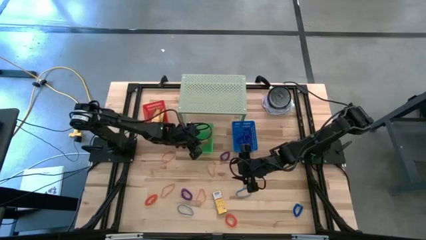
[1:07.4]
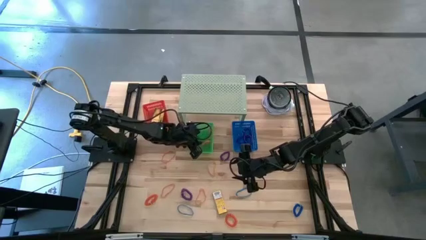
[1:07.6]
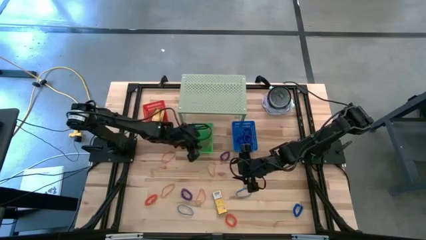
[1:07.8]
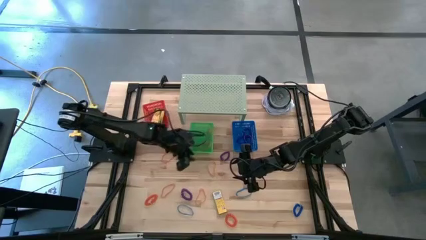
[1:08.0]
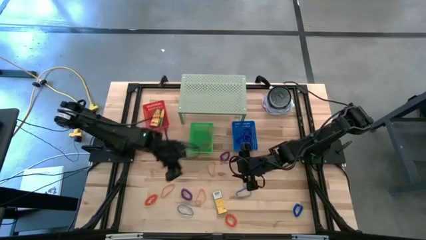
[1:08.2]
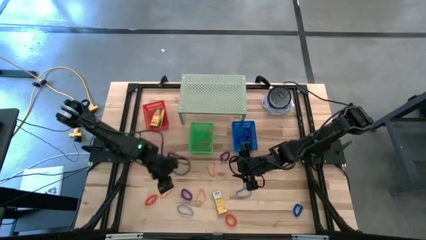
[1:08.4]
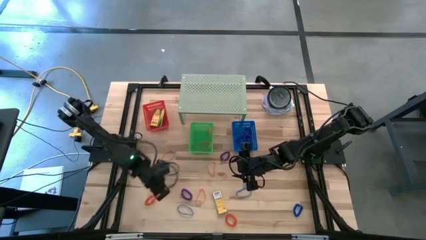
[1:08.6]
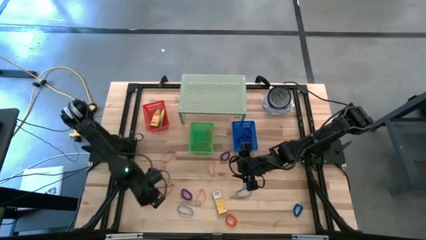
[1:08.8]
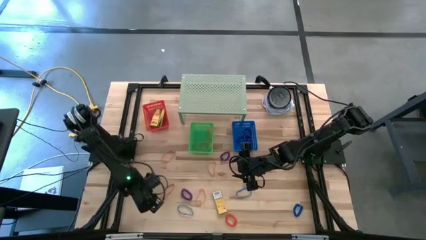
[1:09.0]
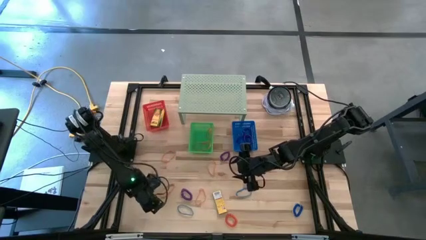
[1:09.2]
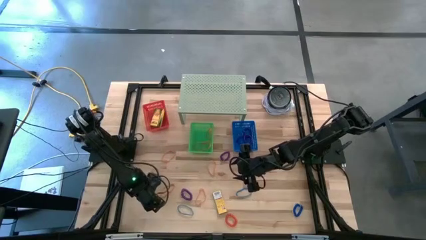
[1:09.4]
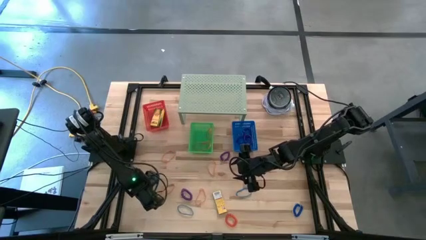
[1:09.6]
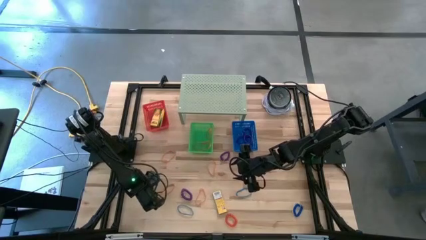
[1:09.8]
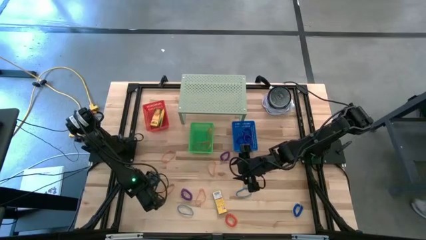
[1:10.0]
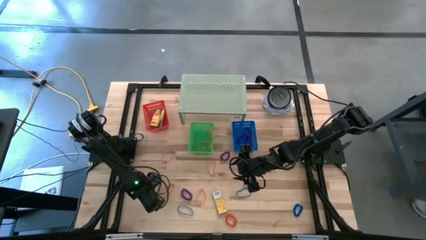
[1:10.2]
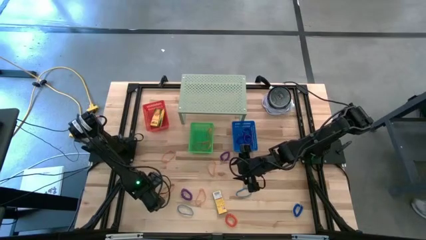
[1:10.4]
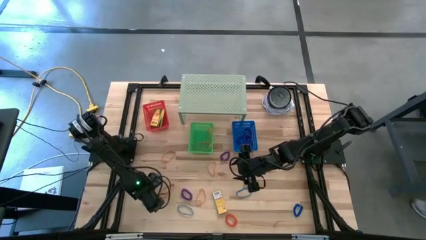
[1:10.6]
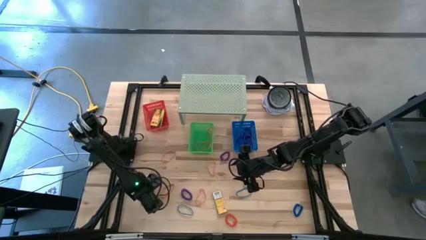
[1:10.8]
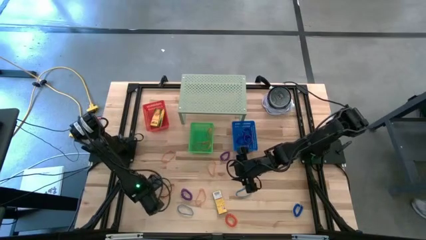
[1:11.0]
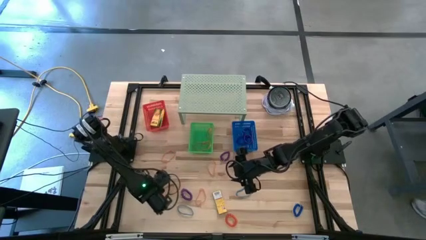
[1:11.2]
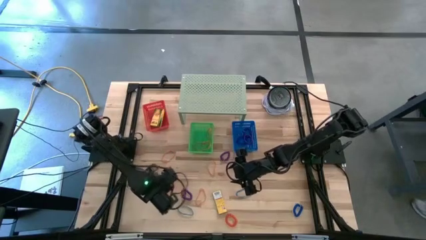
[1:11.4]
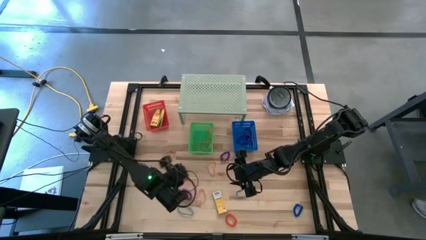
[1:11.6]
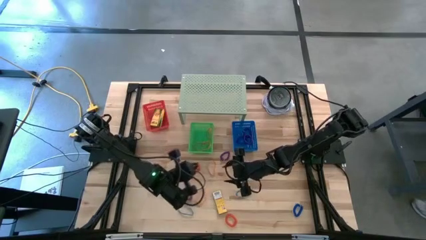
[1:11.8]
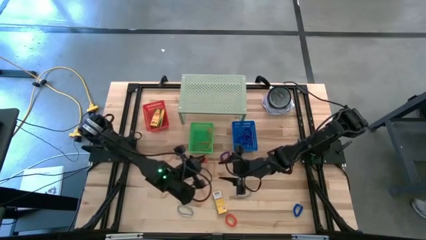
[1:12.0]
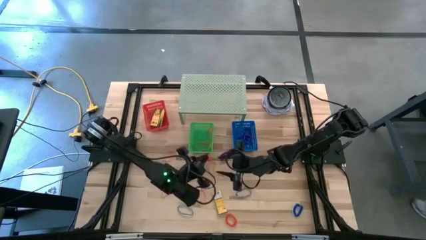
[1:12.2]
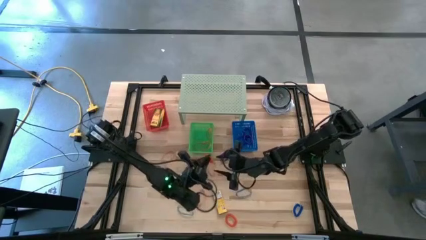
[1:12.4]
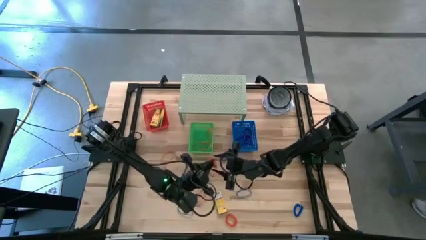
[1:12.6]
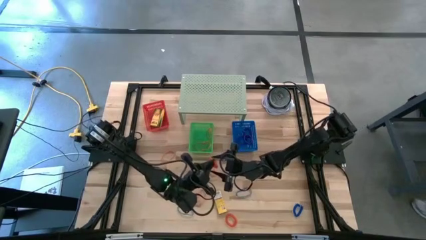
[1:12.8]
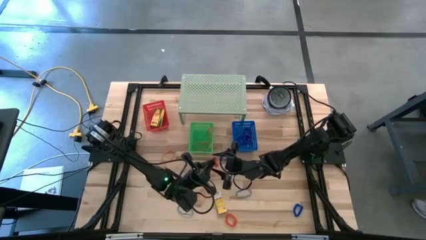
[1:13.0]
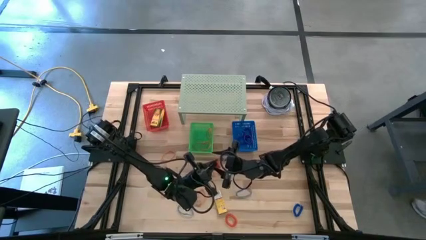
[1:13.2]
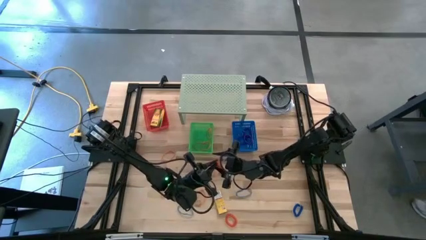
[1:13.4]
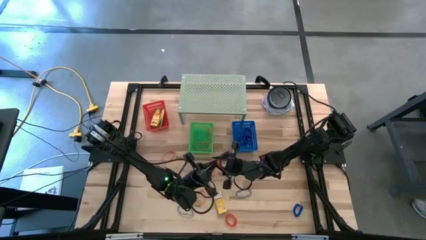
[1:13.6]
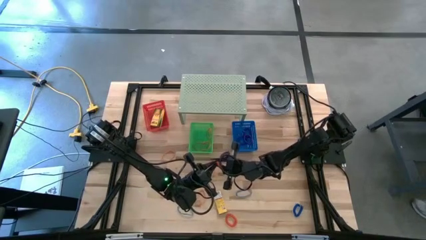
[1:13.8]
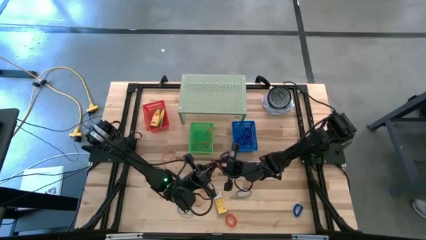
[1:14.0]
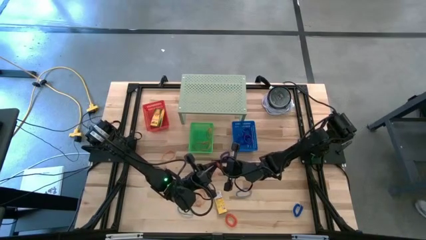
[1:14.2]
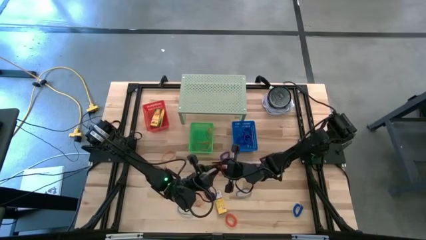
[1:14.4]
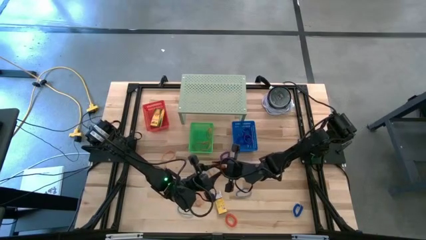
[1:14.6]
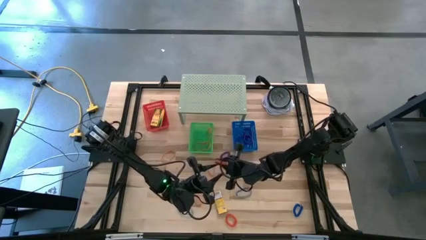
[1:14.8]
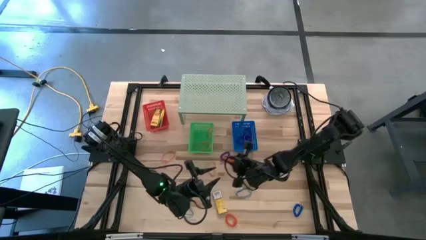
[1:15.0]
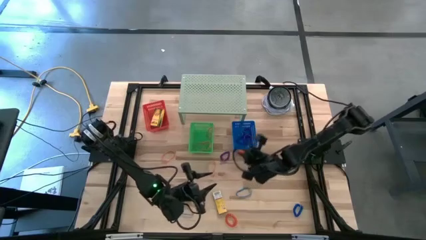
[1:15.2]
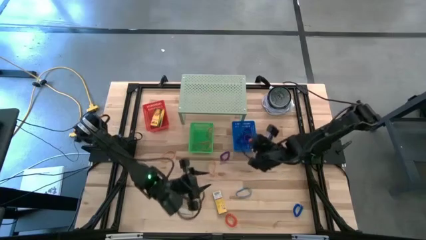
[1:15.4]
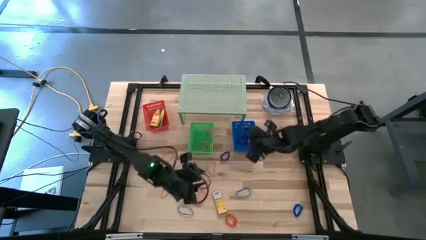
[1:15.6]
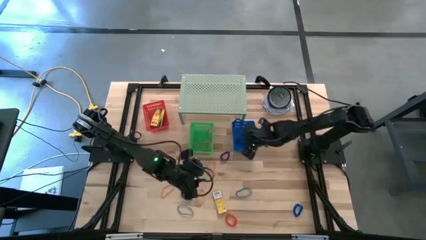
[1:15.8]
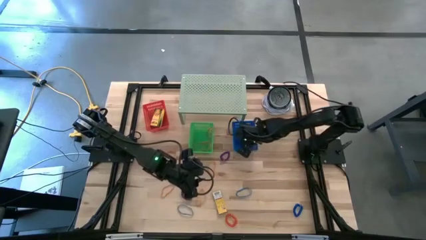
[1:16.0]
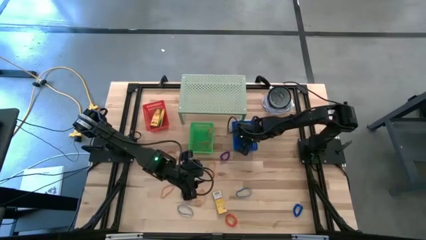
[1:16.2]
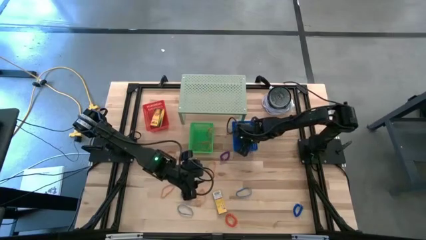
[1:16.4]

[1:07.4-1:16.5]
Task: Pick & Place Office Desk Supplies
Put the orange spring keychain into the blue bin

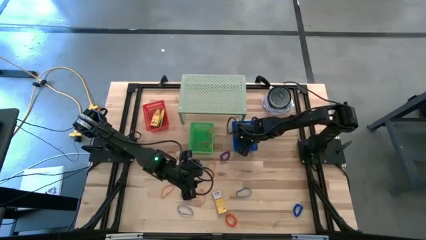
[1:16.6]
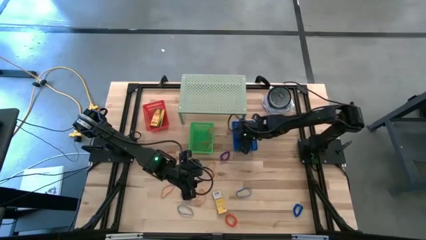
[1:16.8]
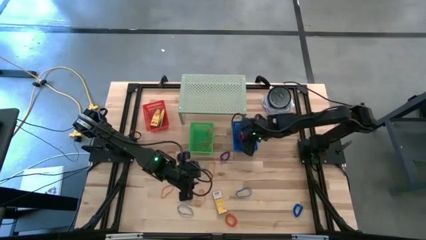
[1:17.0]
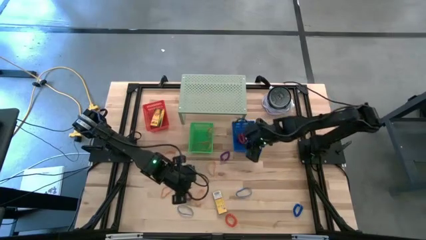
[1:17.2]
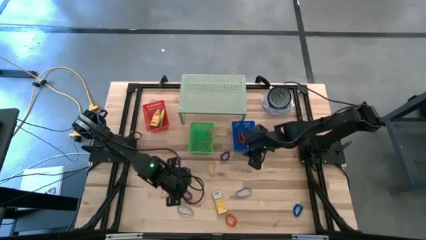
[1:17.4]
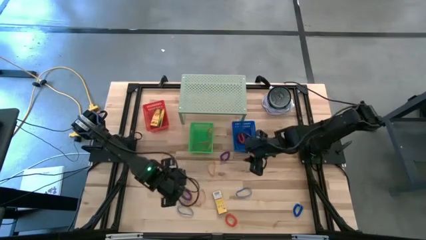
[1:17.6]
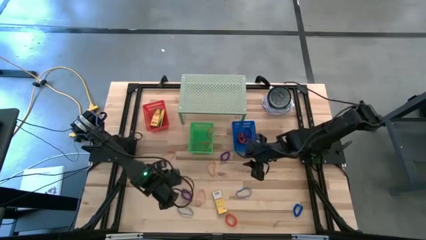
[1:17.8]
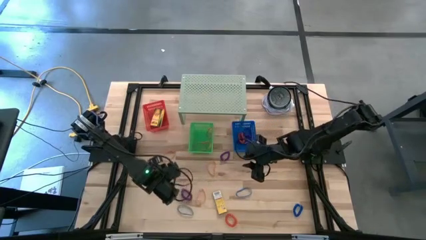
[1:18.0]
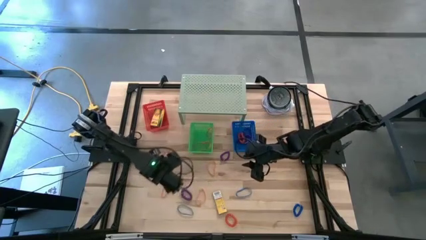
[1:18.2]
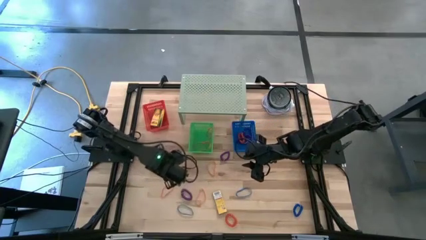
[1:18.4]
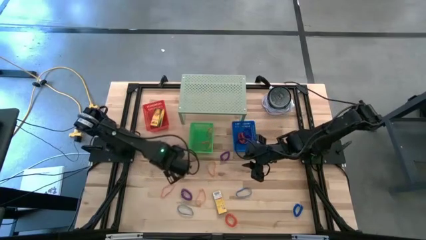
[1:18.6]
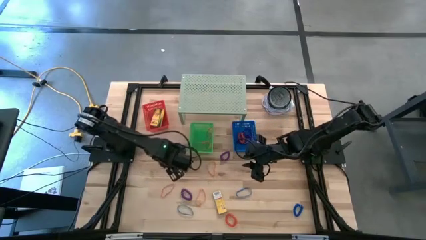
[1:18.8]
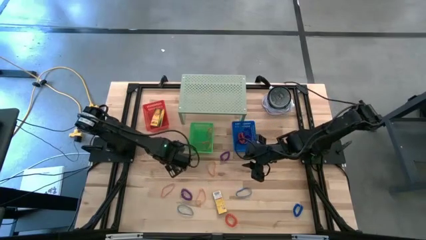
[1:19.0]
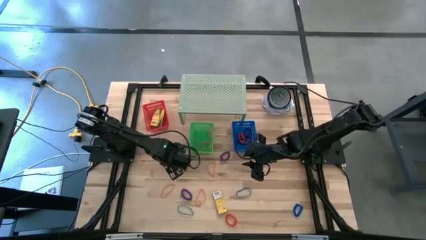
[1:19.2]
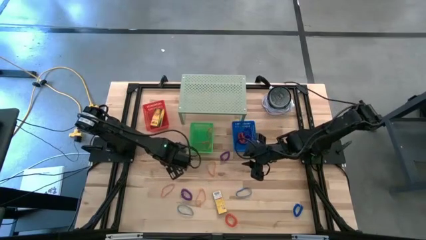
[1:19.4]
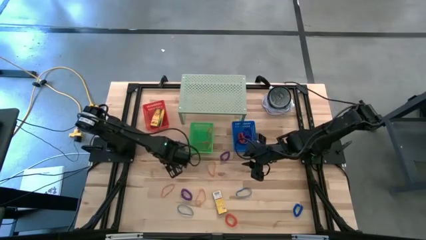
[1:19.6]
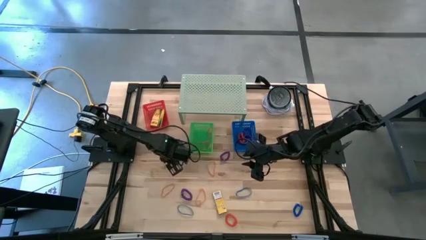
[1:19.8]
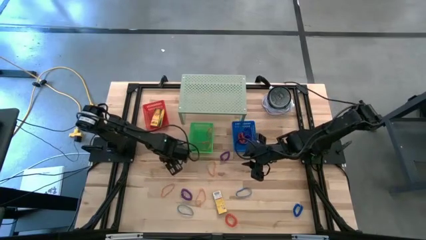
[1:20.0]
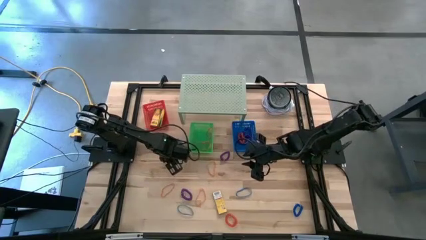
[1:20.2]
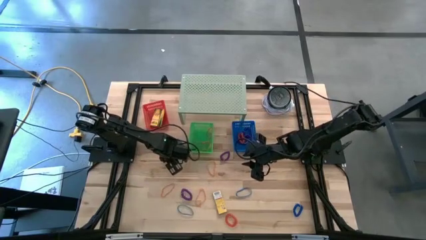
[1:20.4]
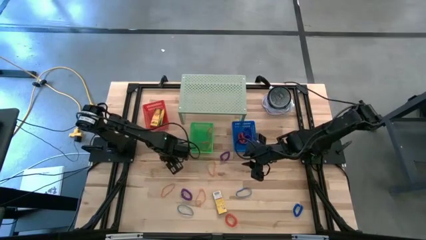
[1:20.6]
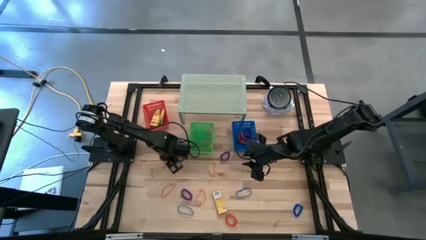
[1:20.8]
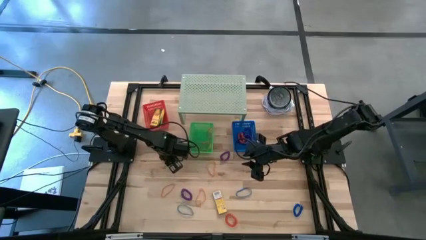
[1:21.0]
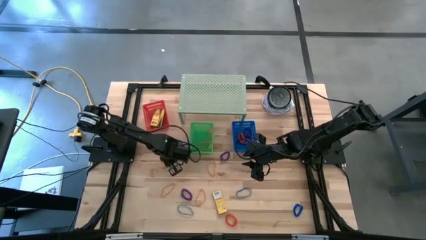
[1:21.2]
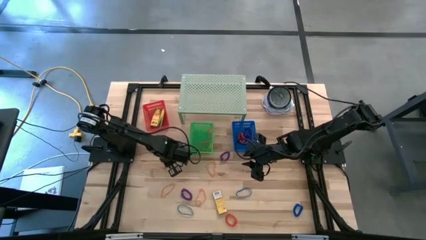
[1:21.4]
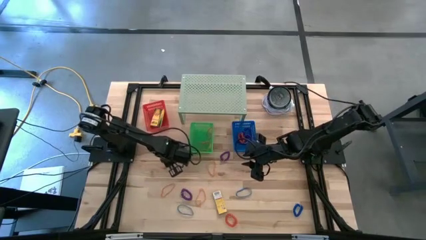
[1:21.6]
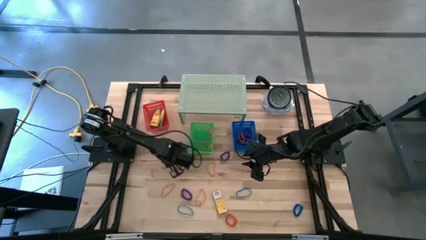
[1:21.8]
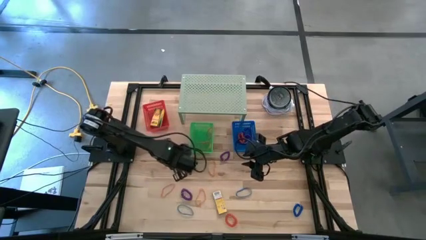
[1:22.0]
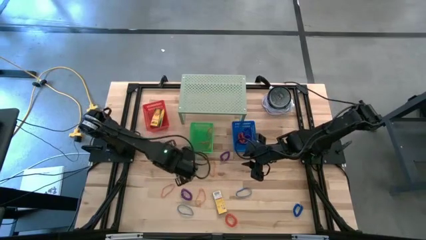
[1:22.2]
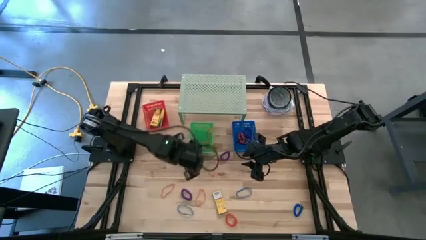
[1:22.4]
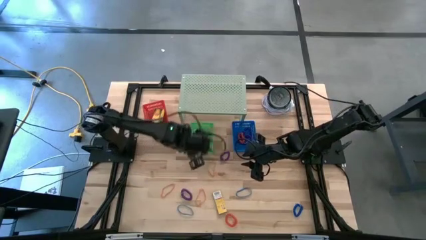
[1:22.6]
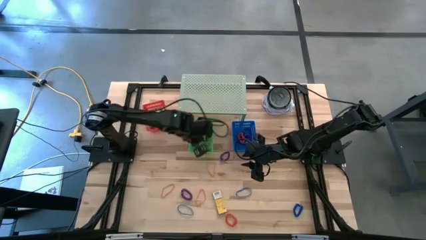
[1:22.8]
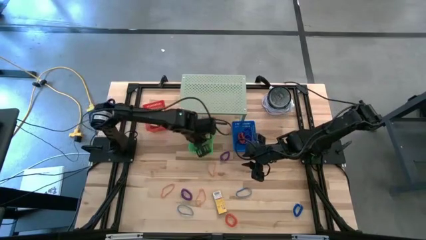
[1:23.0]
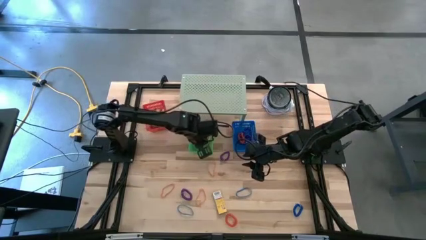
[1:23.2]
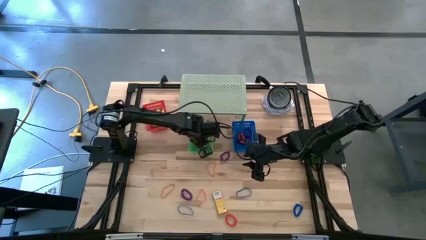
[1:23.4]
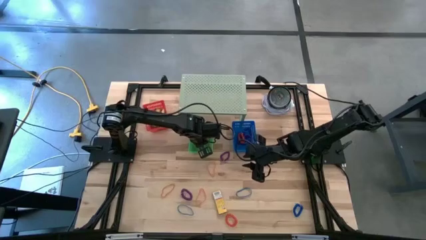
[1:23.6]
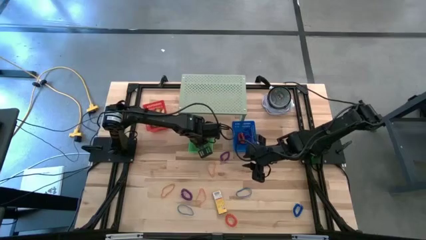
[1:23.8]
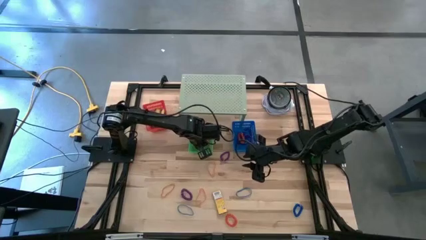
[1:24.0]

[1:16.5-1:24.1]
Put the orange rubber band into the green bin
